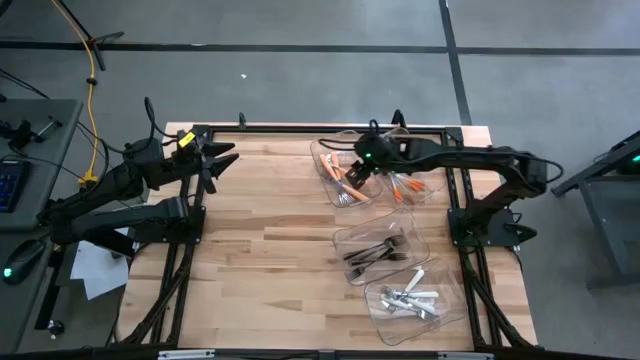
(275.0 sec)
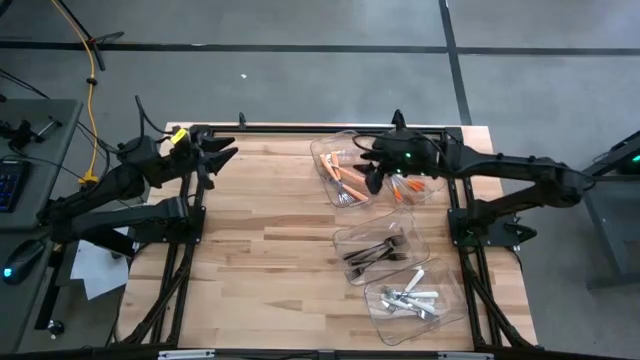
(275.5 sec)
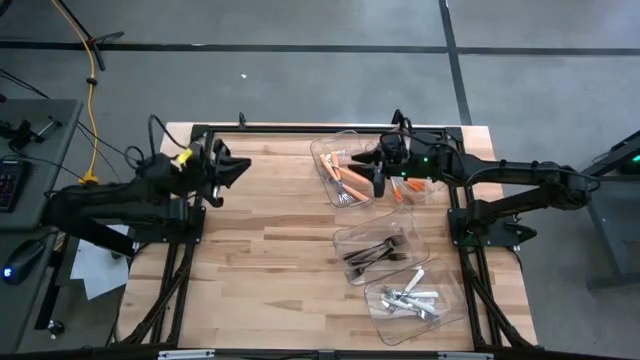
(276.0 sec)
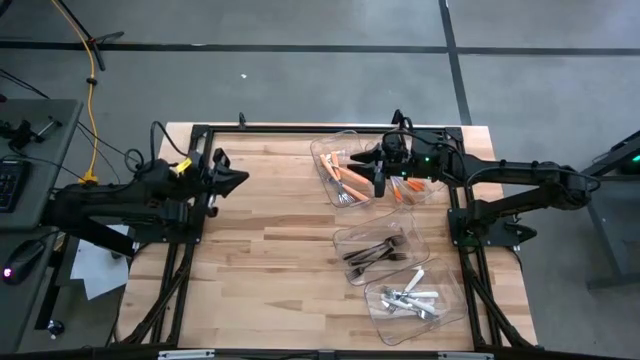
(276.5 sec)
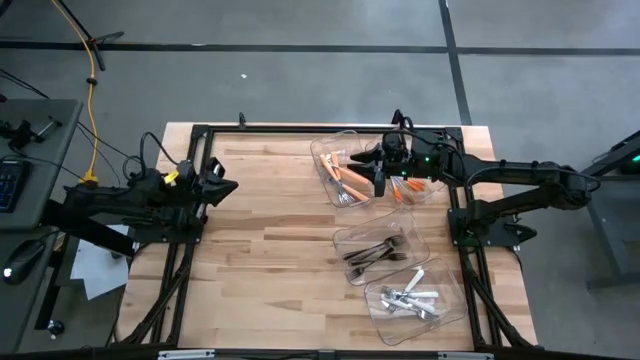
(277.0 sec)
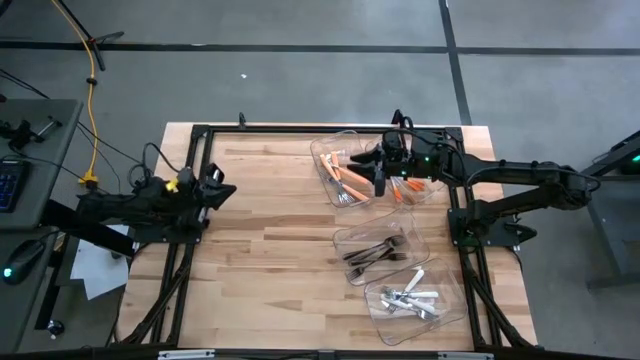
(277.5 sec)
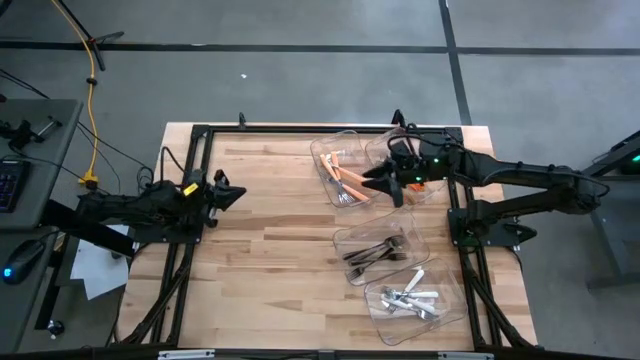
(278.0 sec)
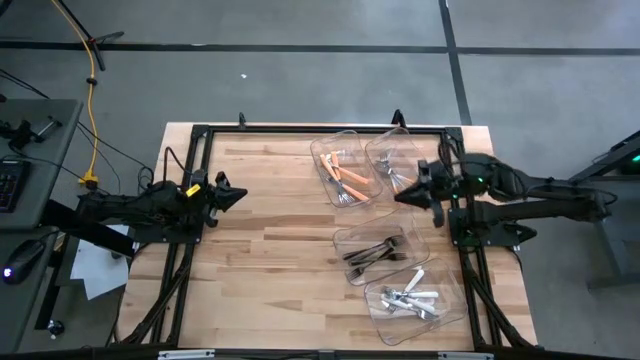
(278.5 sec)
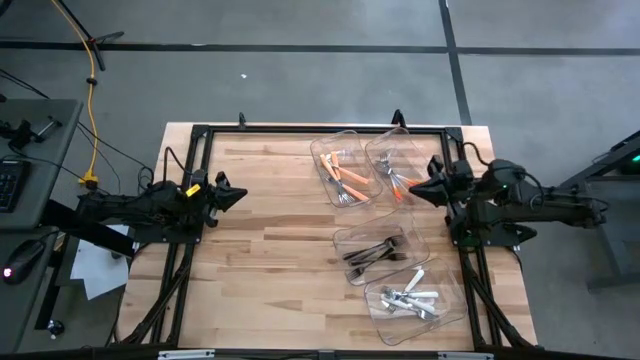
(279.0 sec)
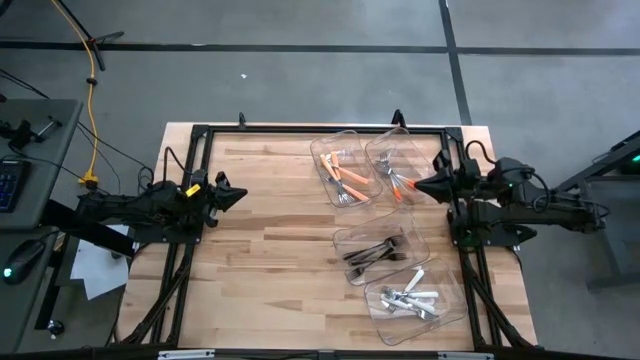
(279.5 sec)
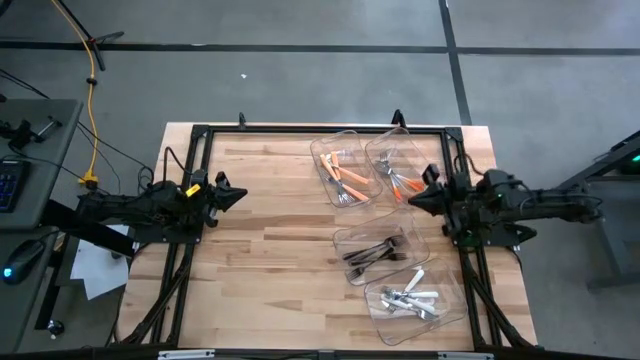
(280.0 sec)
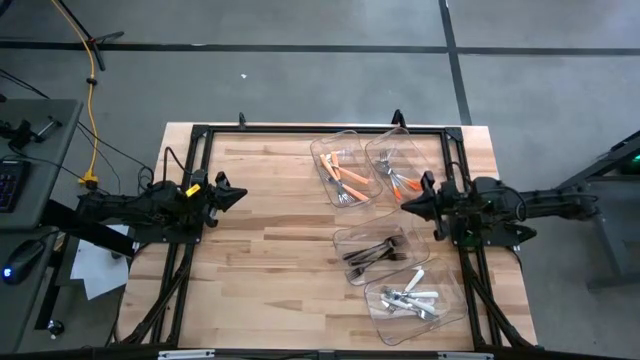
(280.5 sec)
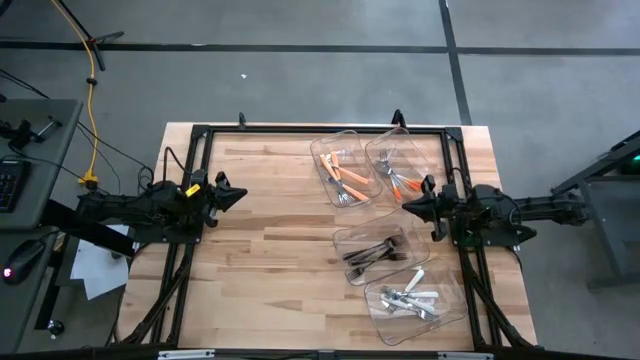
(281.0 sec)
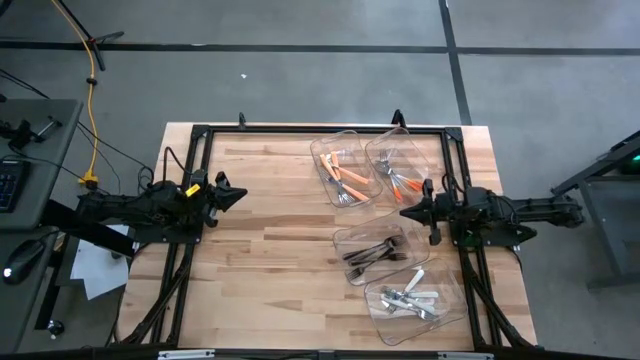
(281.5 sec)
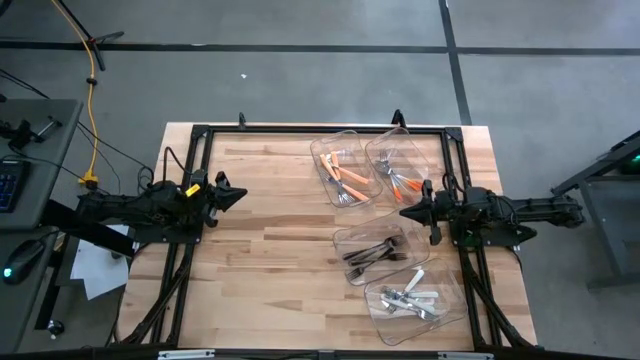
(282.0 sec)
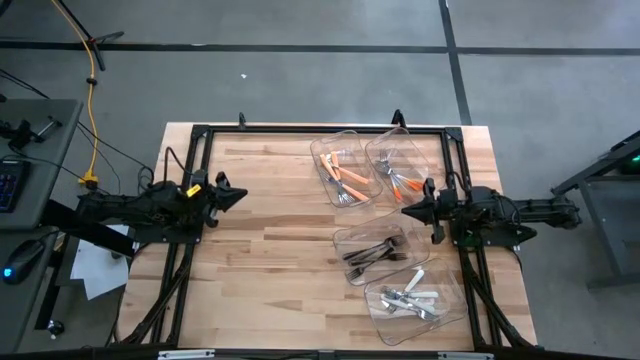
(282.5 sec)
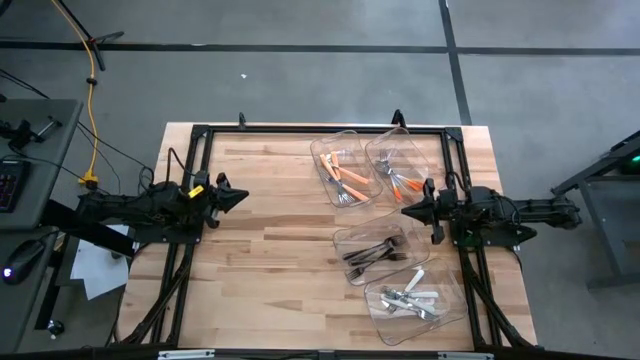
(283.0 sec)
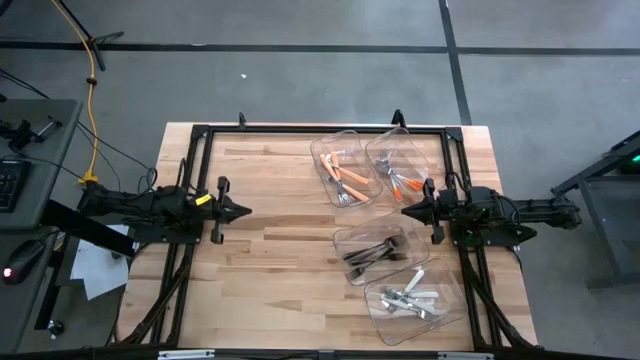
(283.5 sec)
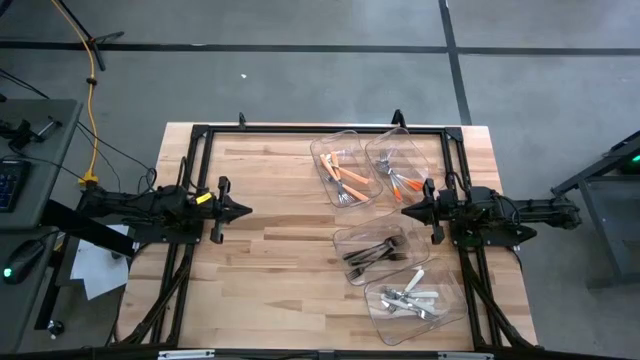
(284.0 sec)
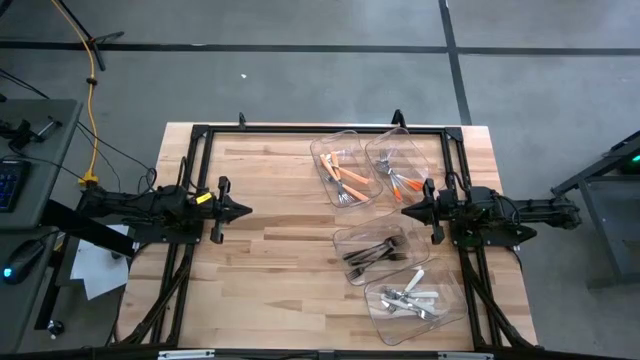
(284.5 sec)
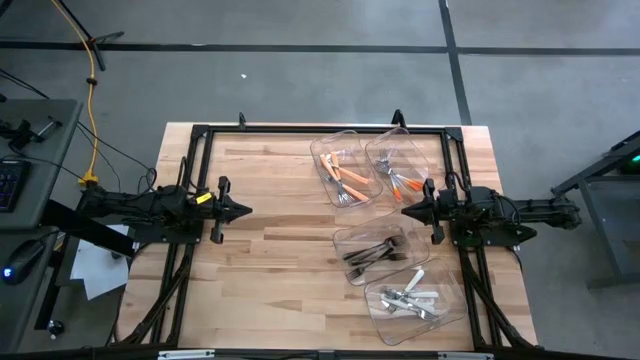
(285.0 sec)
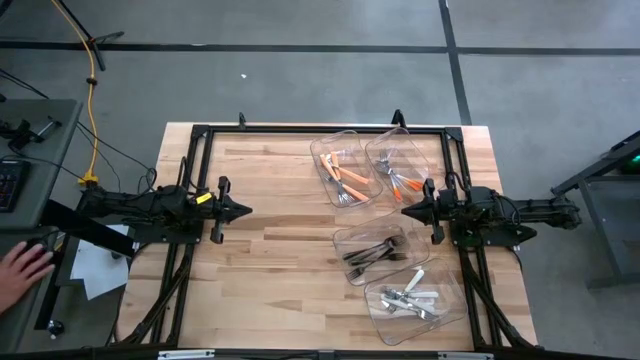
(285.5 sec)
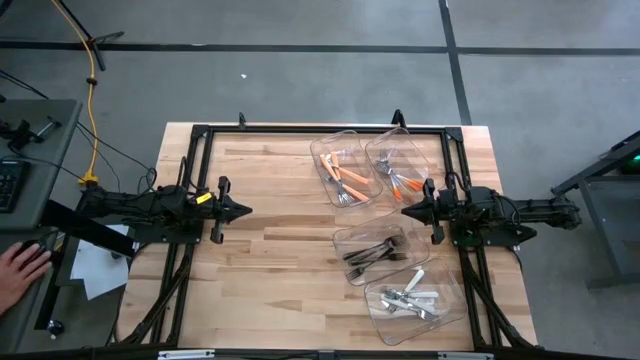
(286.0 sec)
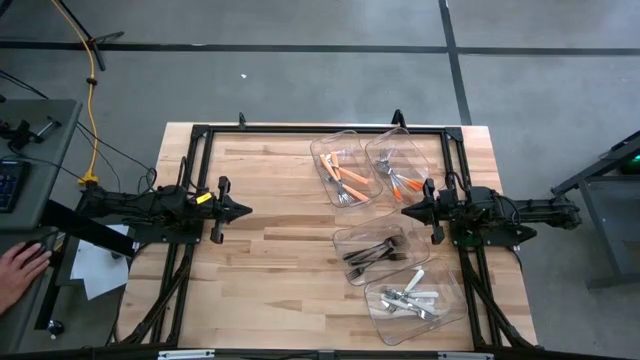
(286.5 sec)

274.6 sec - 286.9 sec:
Task: Sort silverware by color (type)
Return to Home Position

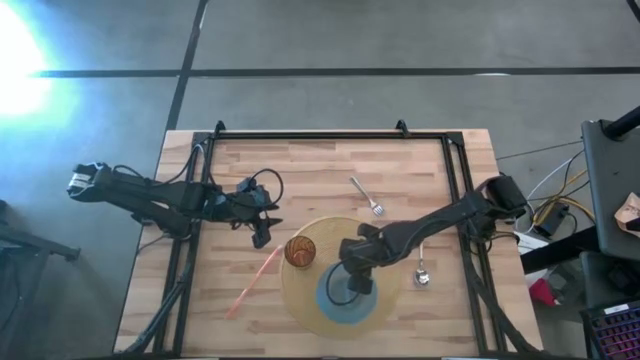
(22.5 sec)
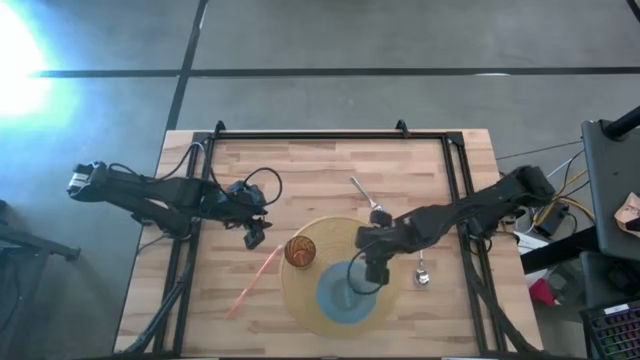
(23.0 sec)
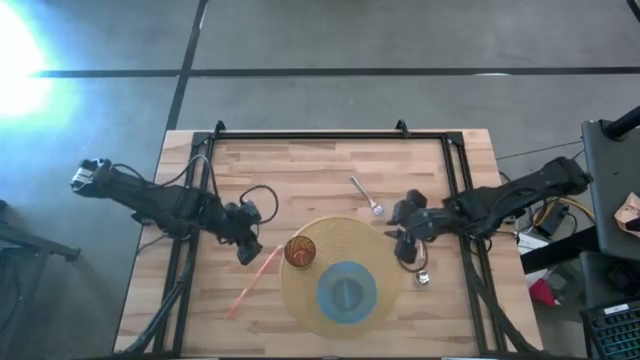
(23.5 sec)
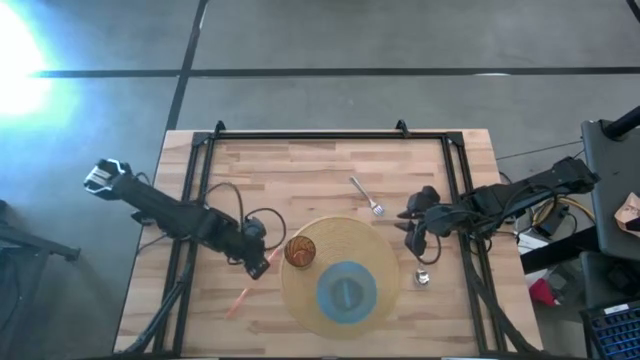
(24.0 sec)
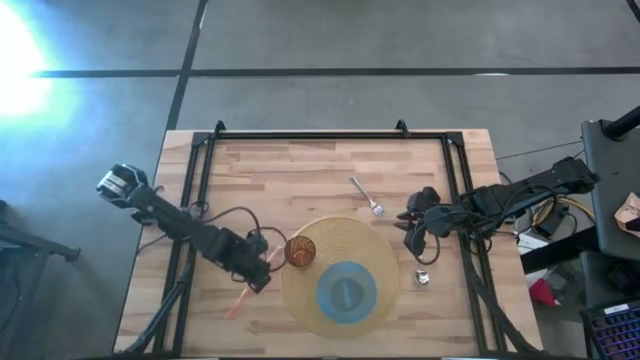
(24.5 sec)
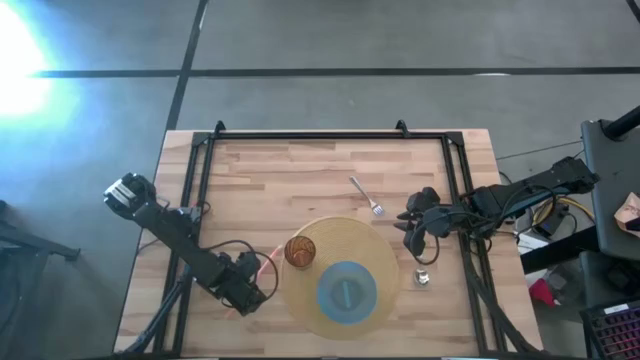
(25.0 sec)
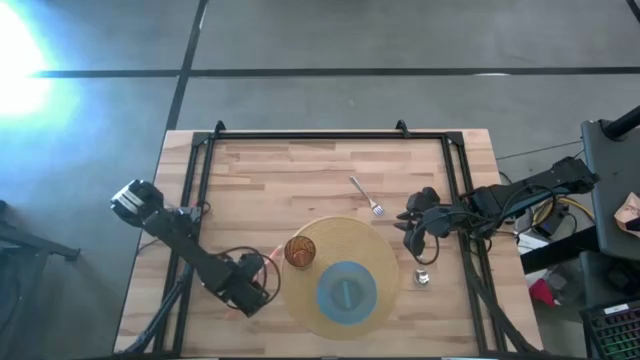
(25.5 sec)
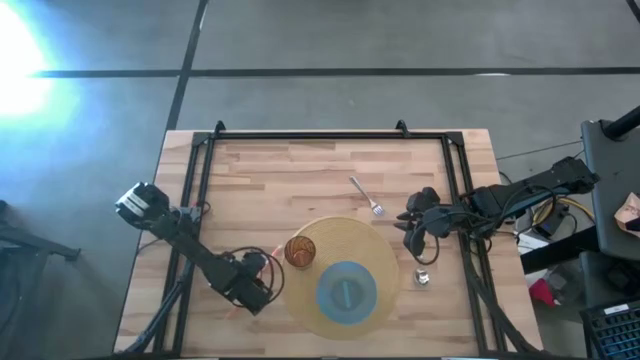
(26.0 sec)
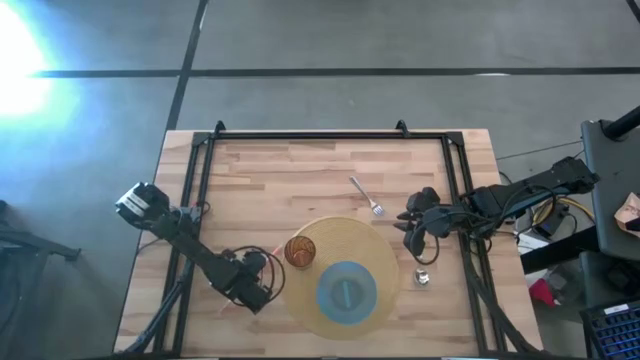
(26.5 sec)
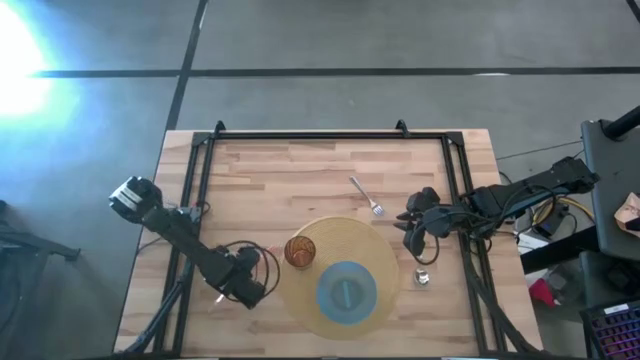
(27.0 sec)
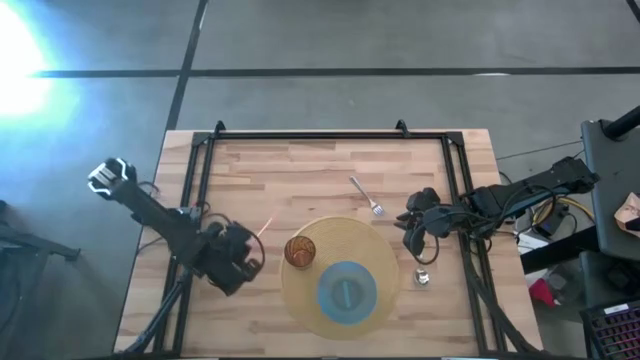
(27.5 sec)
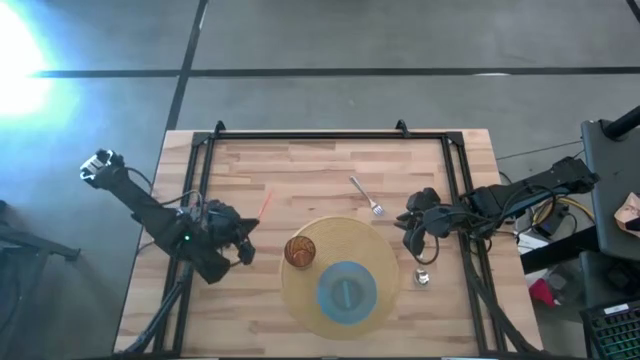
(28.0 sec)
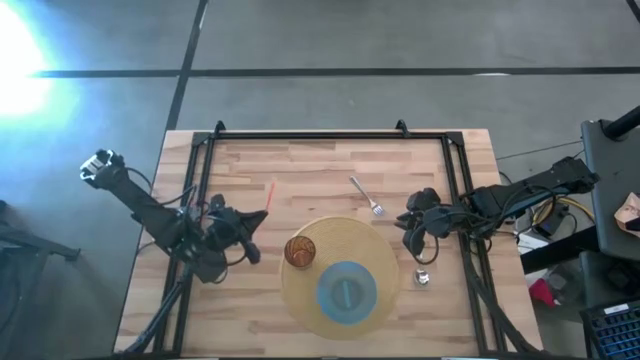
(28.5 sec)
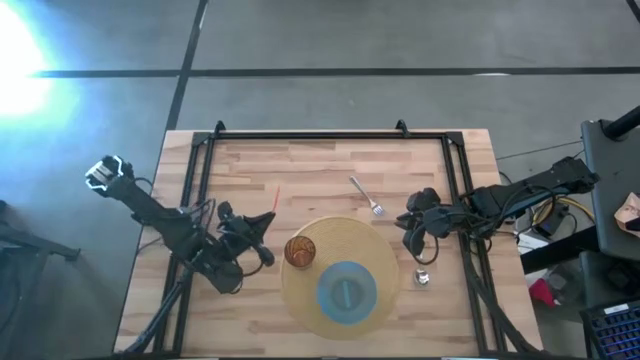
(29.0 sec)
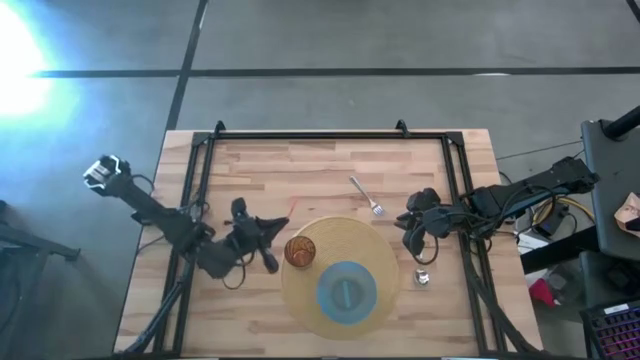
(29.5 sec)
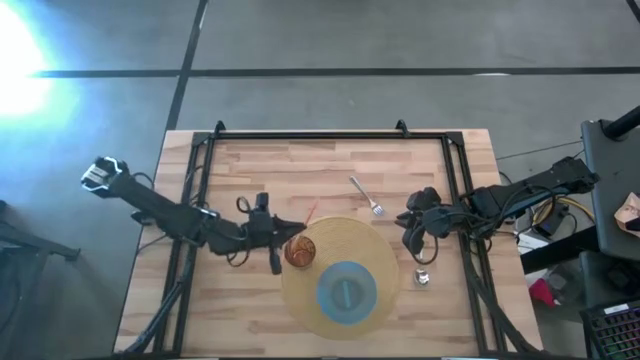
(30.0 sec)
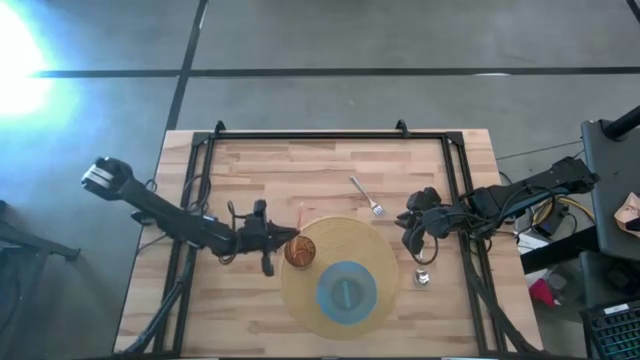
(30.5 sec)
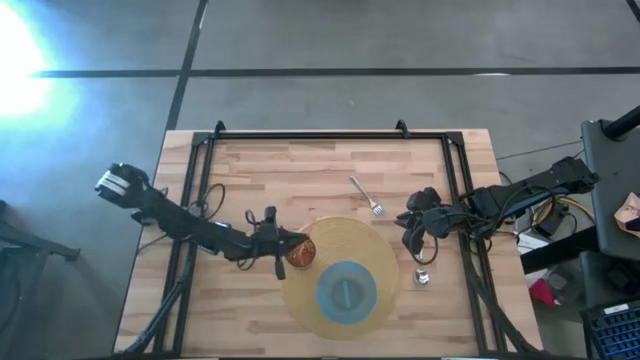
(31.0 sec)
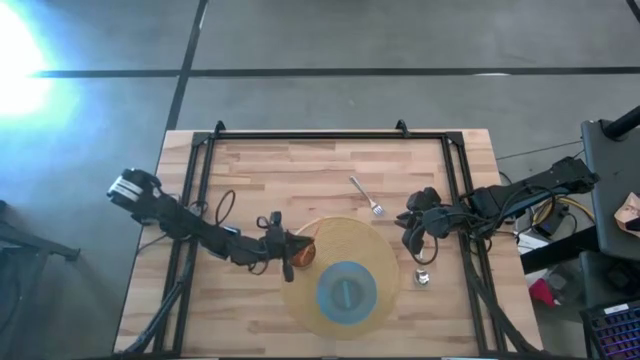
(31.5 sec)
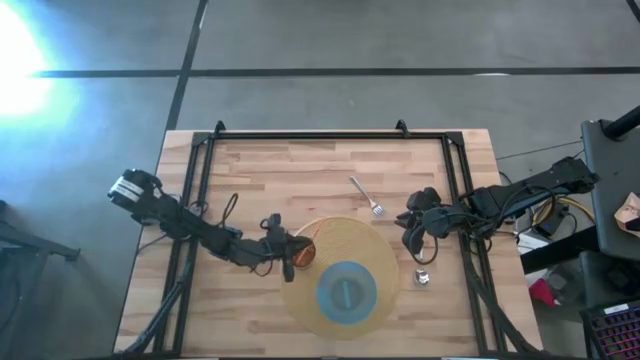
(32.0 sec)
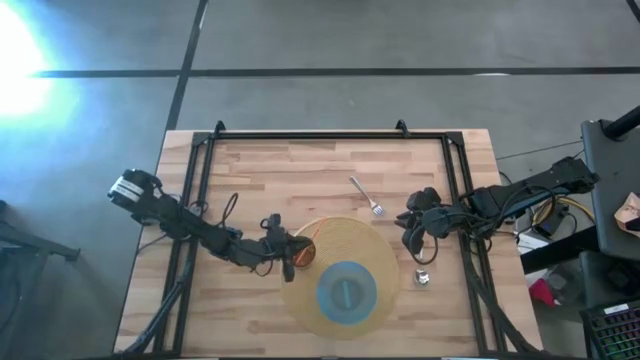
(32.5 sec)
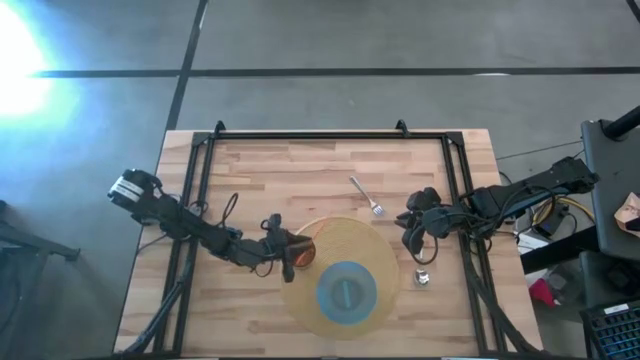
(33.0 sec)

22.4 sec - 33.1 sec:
Task: Pick & Place Utensil
Put the orange straw into the brown cup
